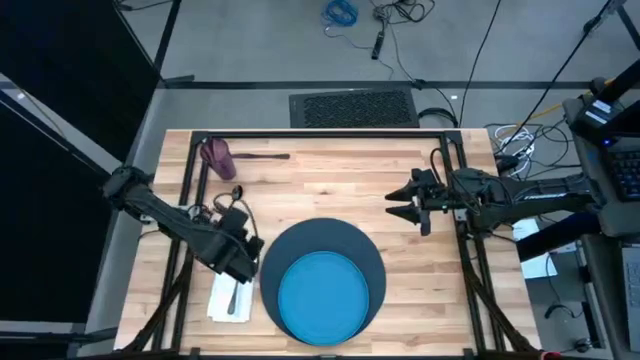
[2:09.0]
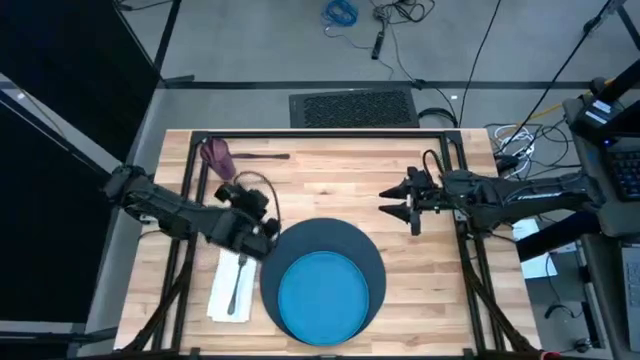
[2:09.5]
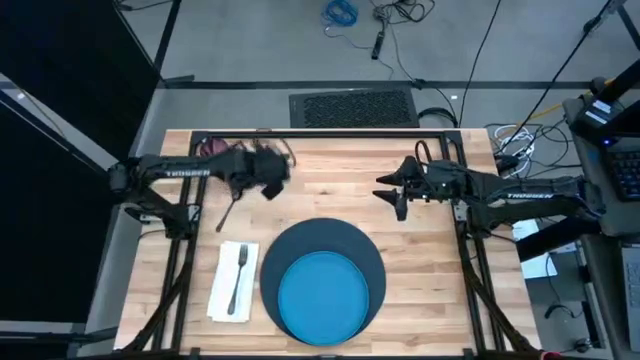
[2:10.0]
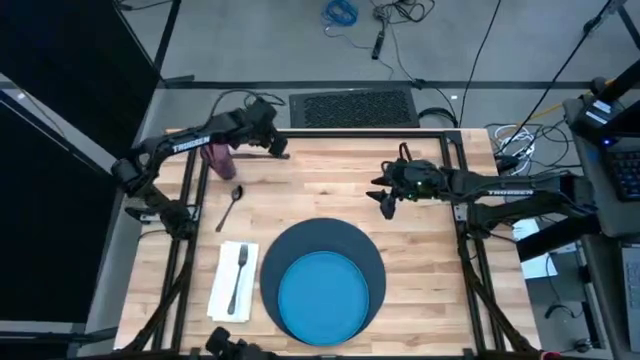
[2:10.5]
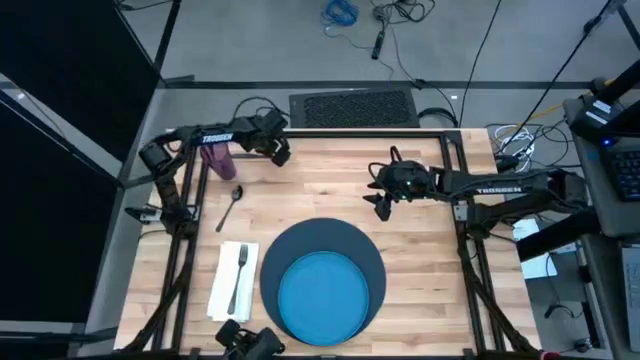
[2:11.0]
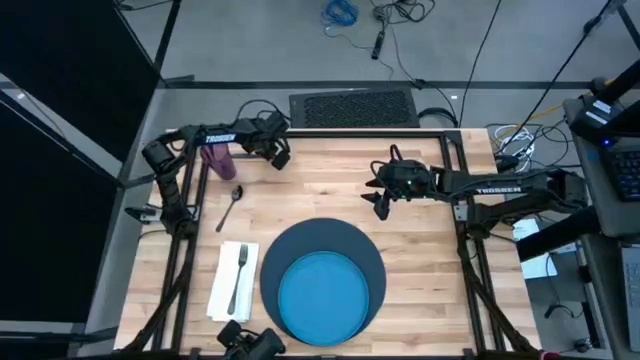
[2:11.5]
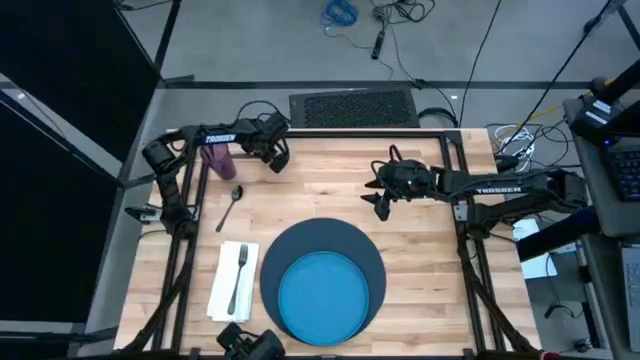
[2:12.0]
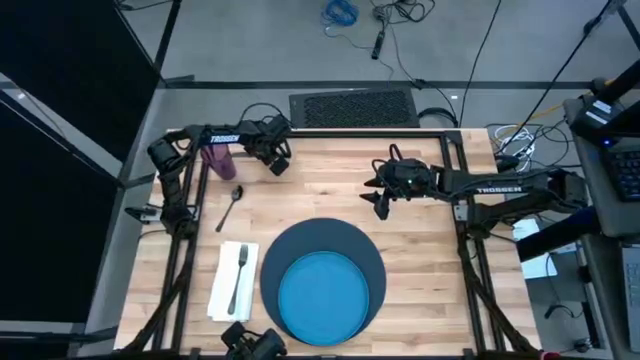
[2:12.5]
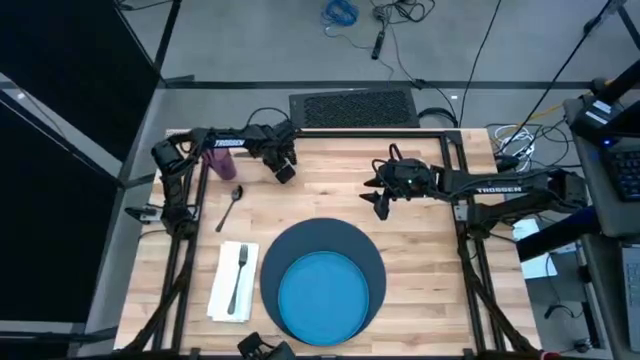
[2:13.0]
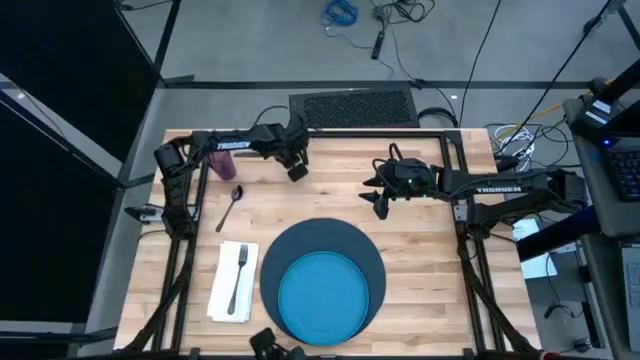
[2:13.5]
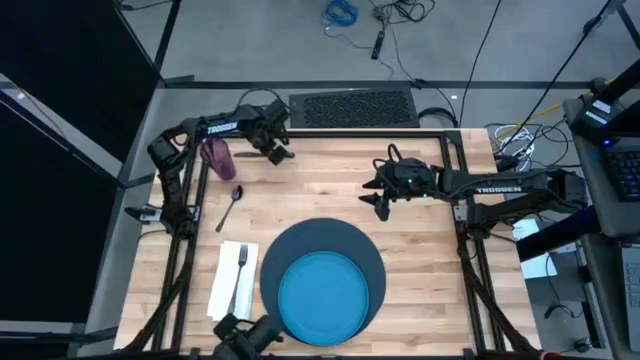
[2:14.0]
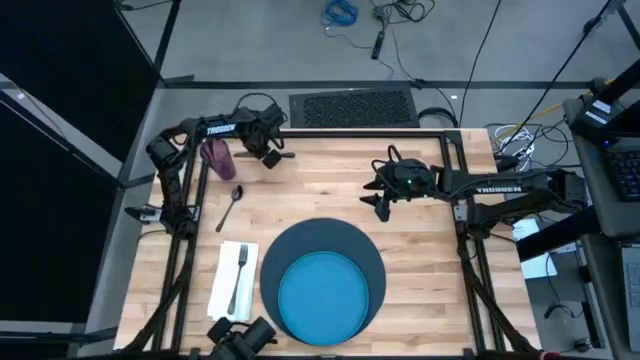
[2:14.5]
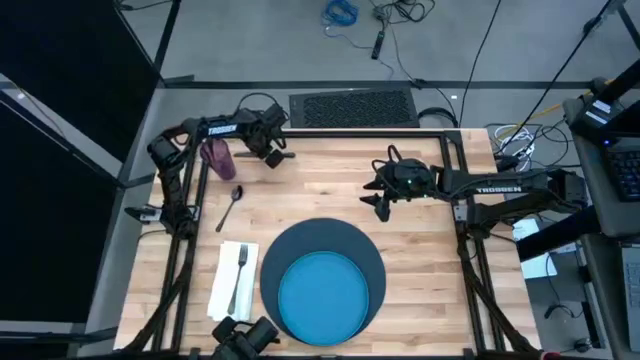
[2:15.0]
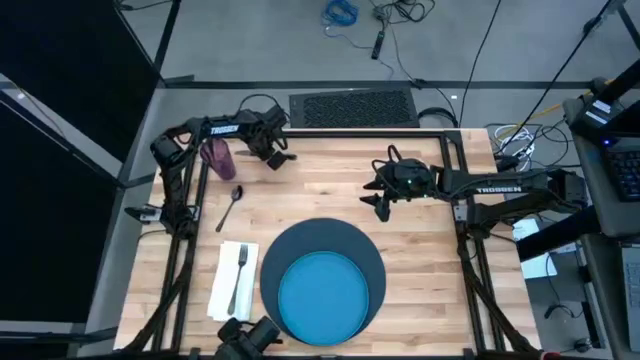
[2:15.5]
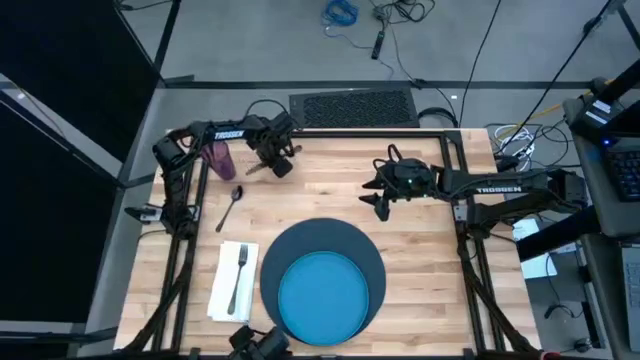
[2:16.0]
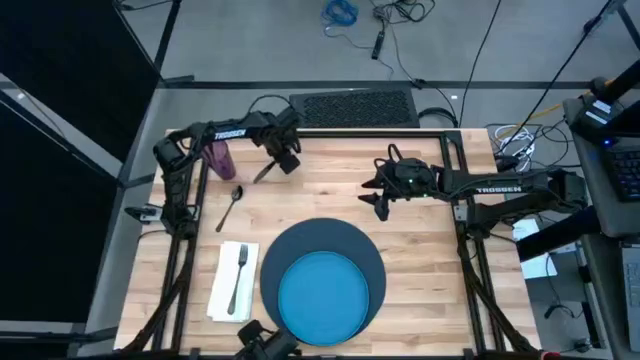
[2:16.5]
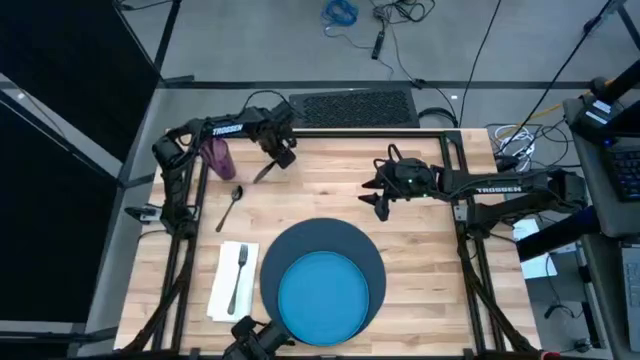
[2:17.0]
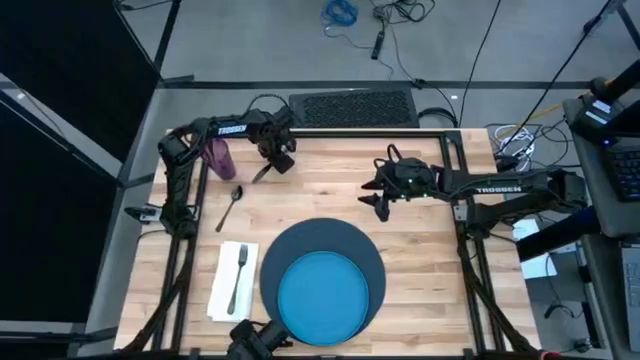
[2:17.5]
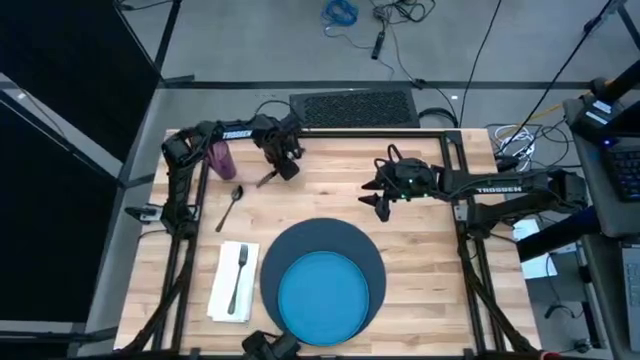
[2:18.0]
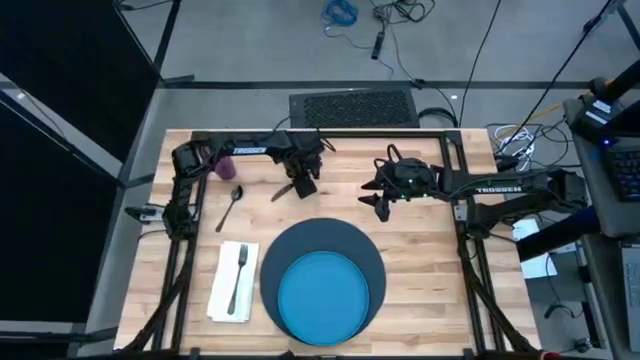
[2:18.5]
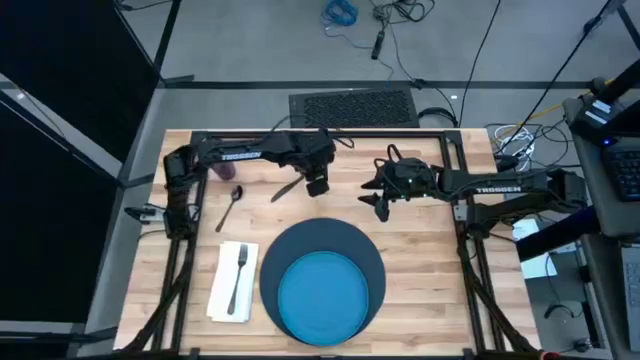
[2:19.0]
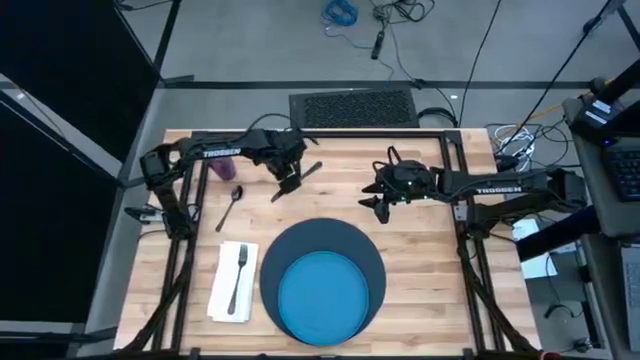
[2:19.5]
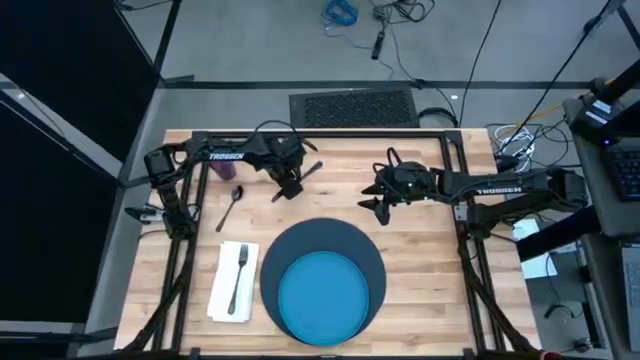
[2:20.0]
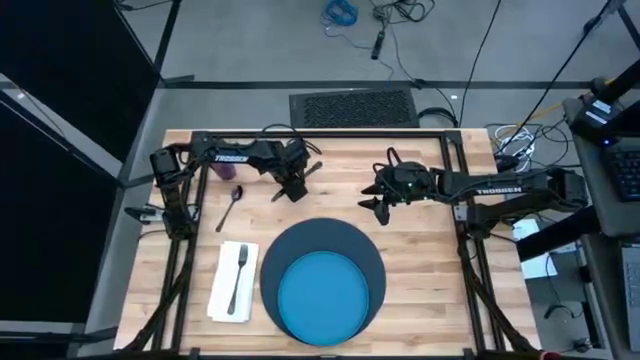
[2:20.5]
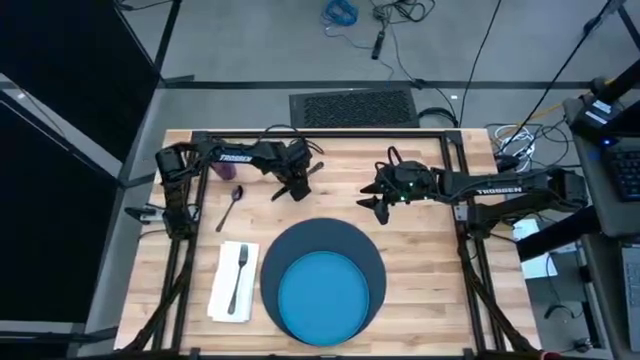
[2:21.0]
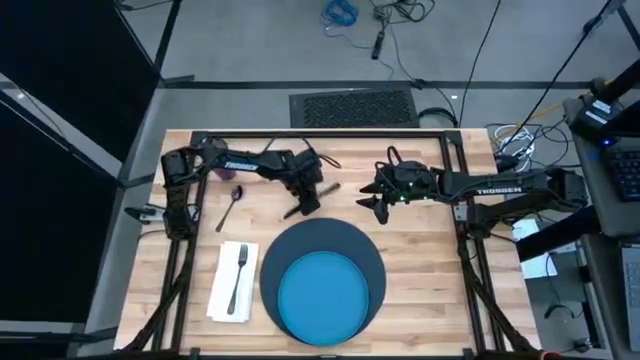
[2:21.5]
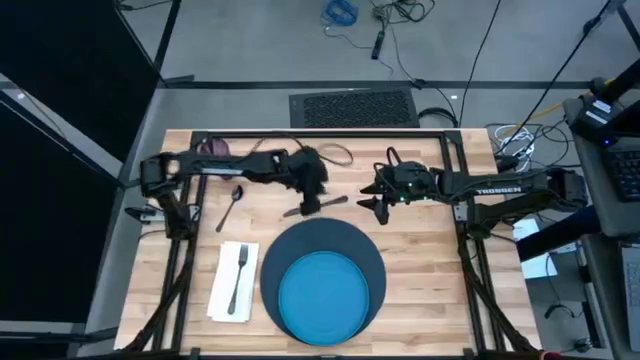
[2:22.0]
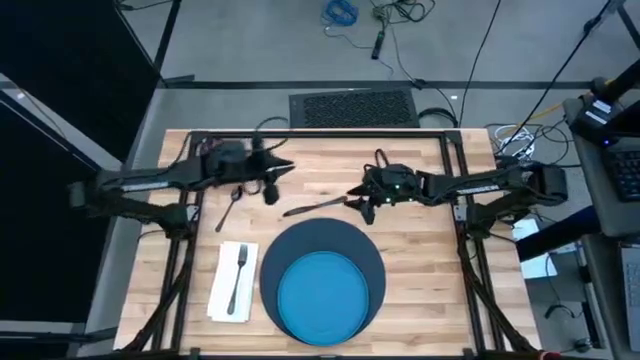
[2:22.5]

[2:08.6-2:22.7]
Task: Set table place
Move the table knife to the right of the table mat

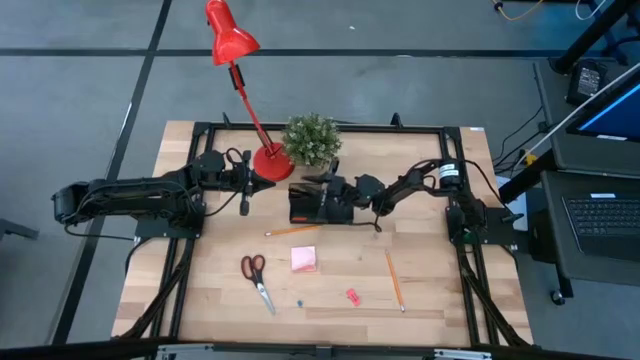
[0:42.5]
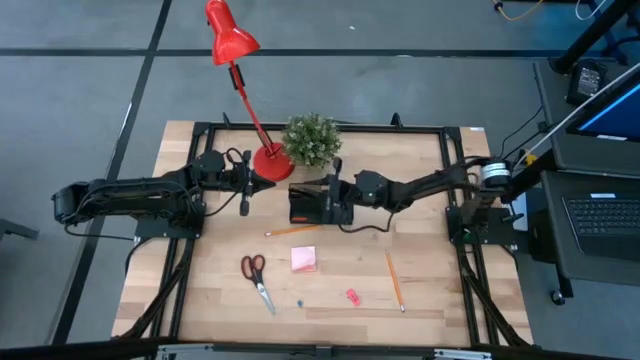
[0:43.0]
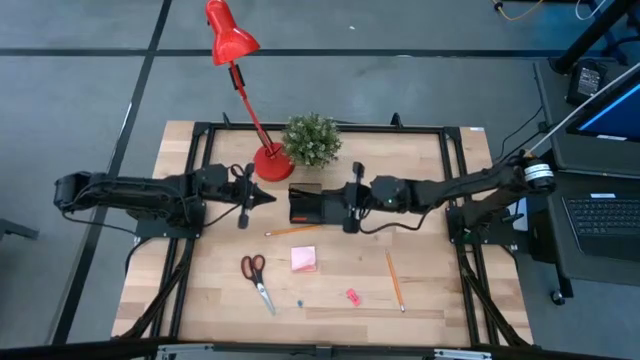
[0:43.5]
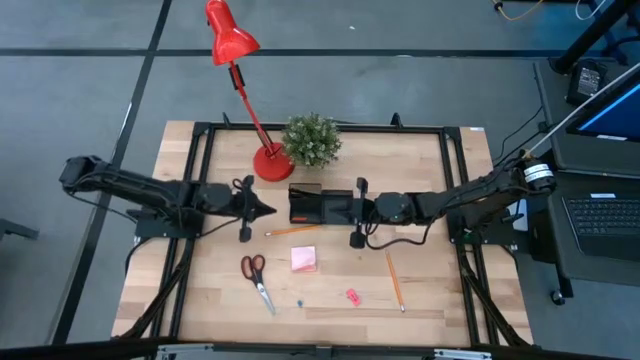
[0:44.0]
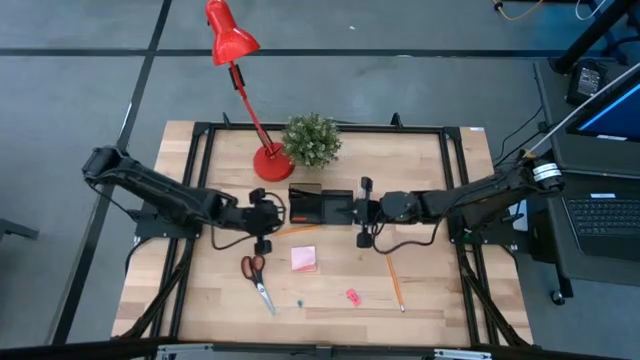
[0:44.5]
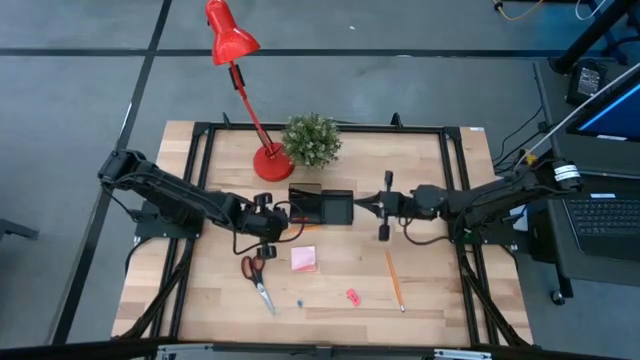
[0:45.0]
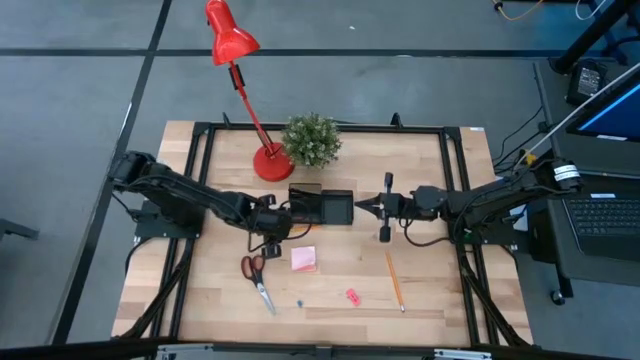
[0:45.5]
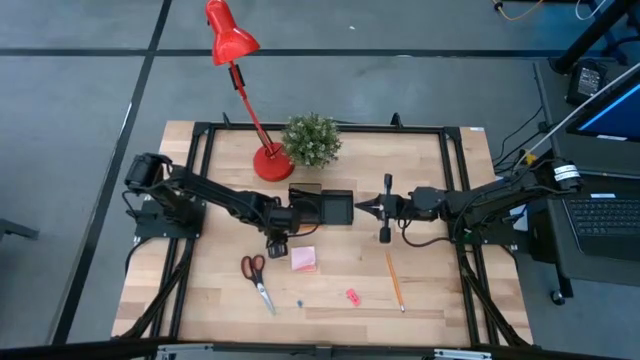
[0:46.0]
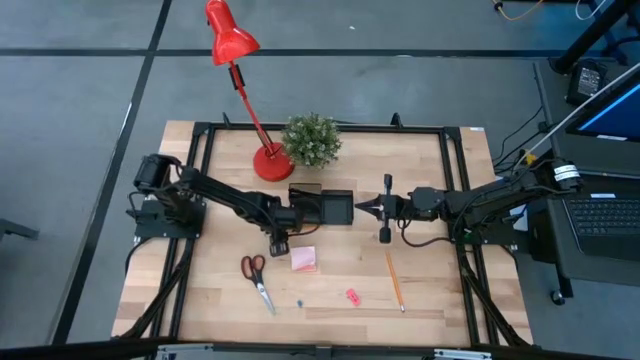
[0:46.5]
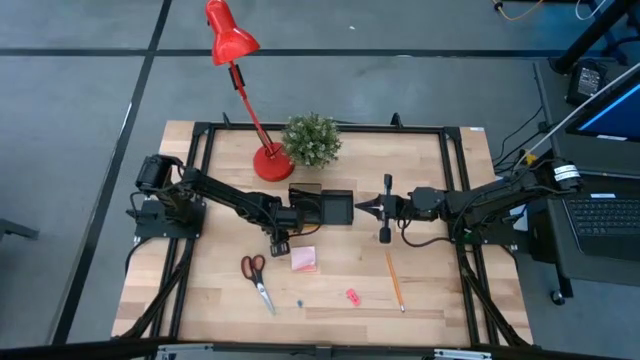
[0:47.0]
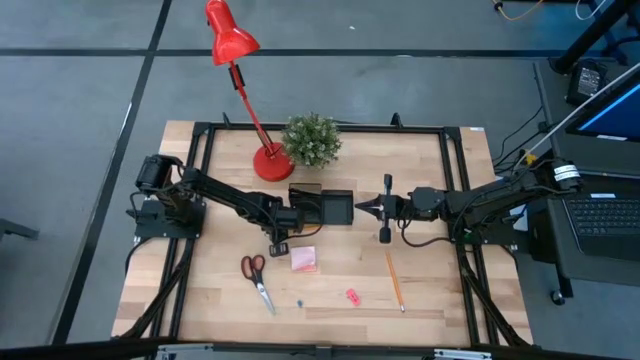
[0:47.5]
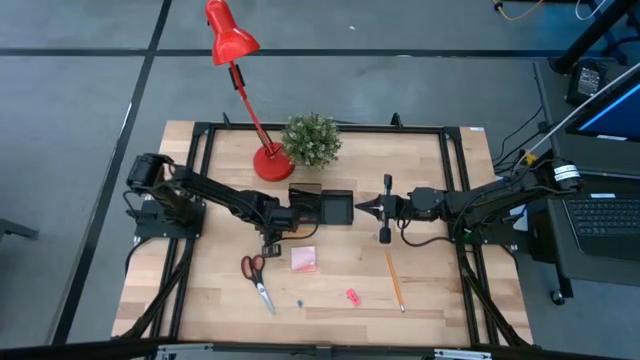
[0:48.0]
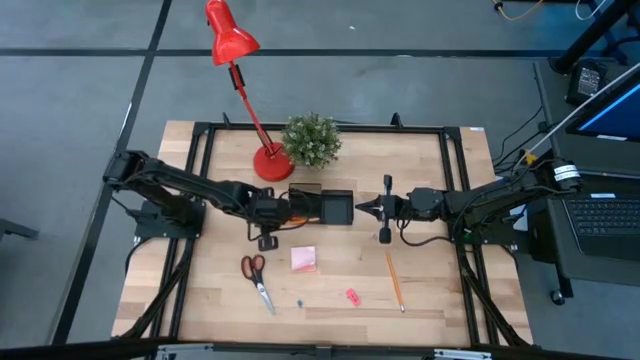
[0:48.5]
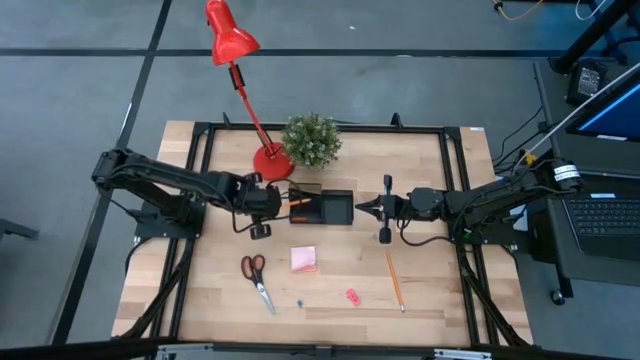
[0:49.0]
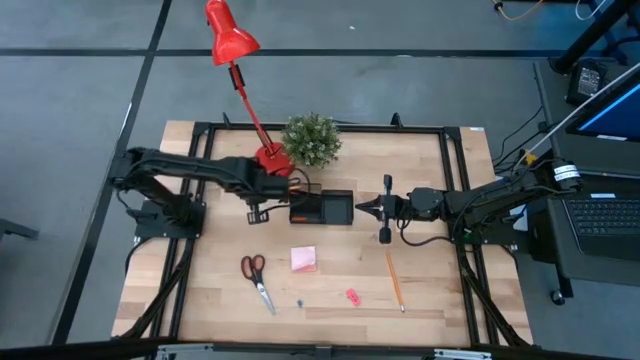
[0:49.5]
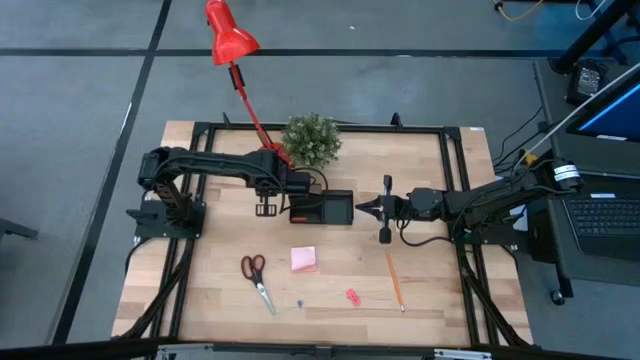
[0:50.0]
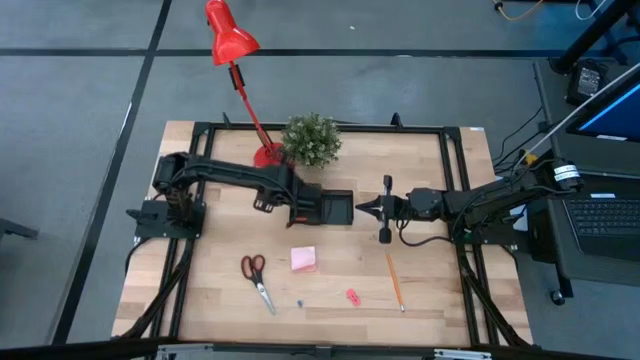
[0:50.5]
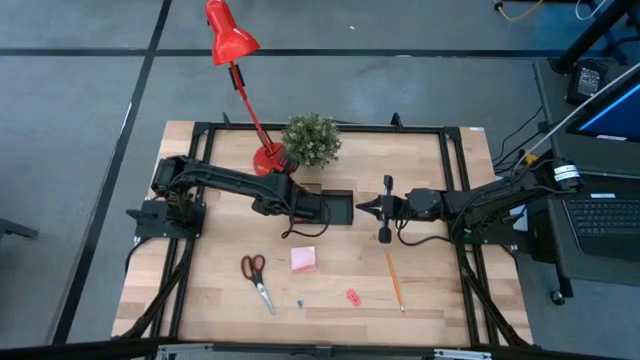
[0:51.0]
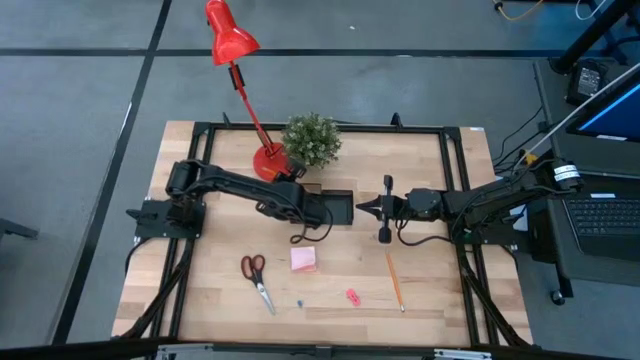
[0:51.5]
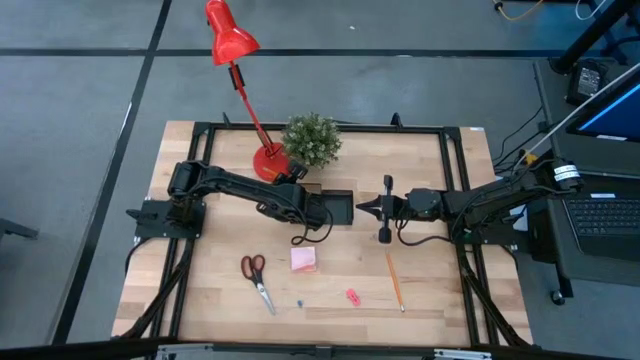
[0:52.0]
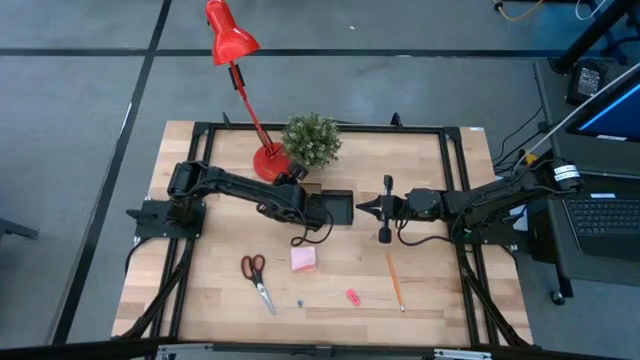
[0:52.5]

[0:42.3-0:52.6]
Task: Pick and place office supplies into organizer
Put the orange pencil into the black desk organizer
